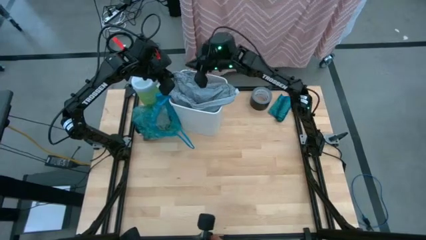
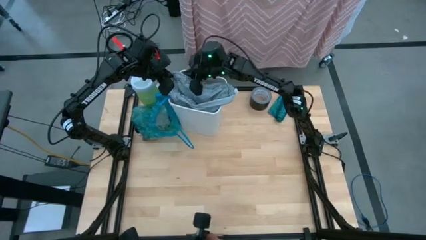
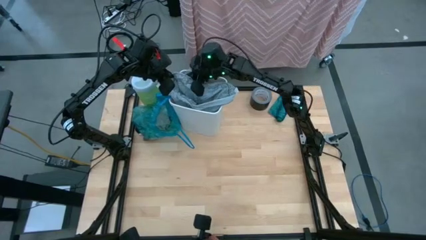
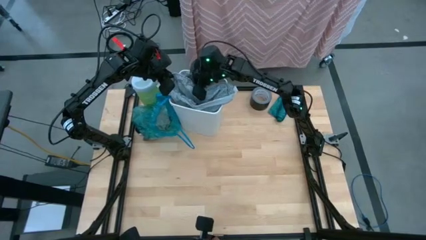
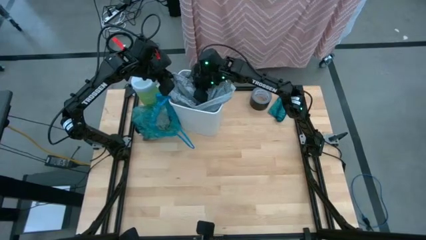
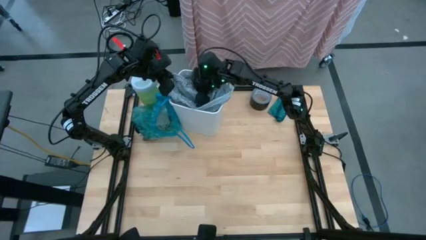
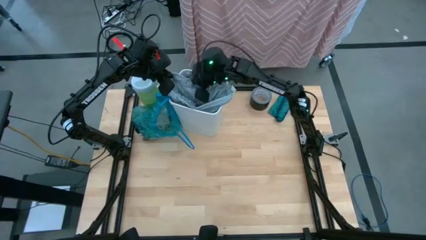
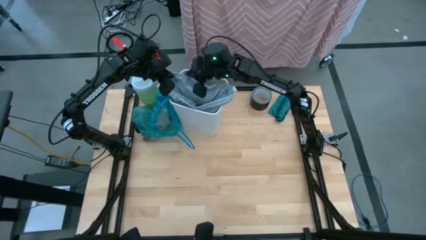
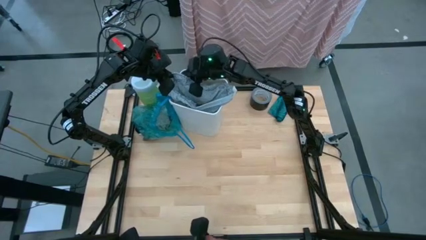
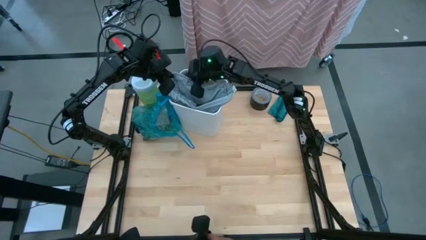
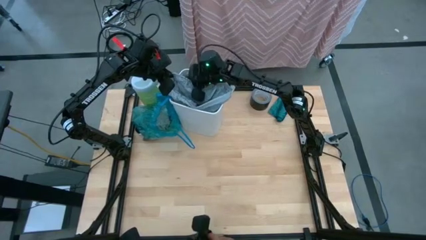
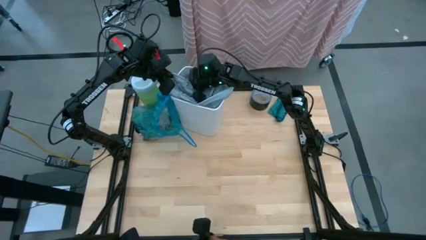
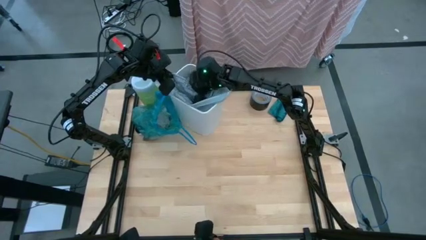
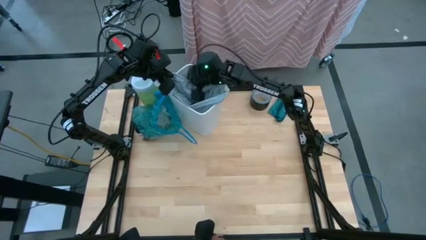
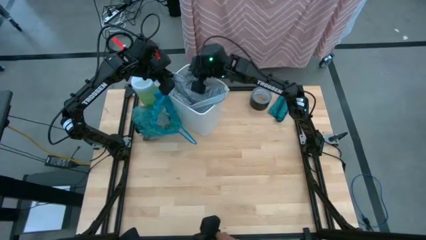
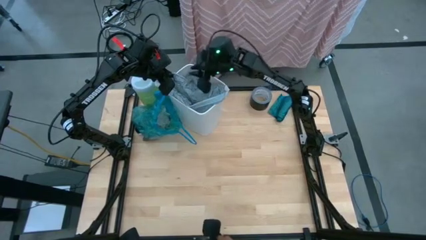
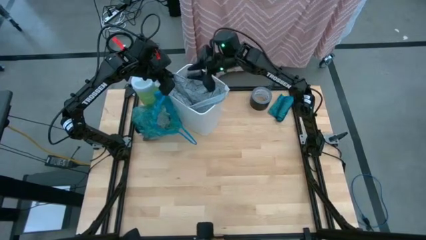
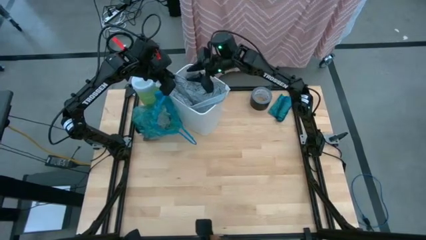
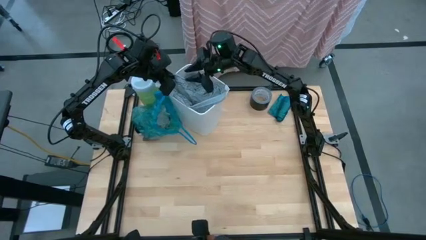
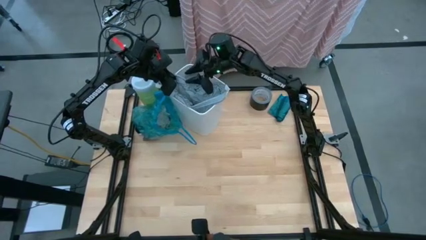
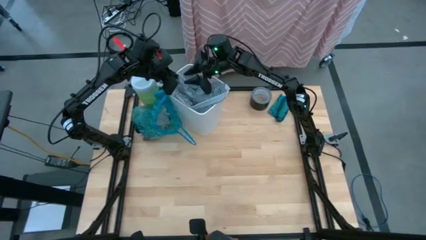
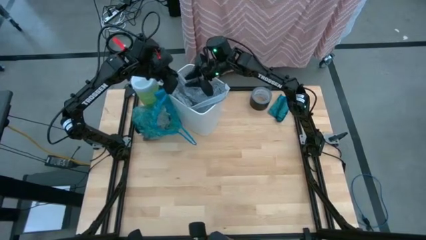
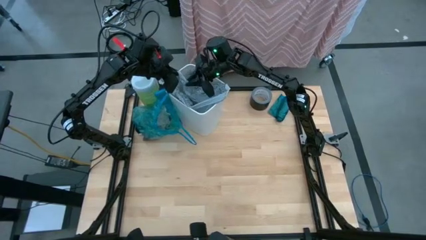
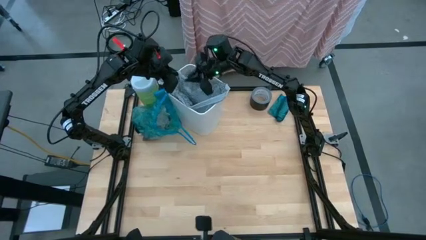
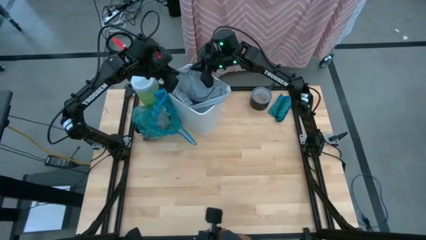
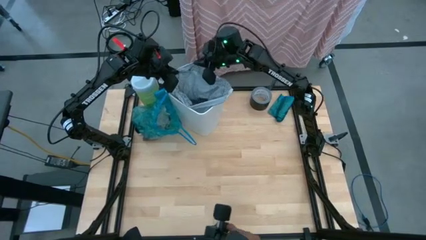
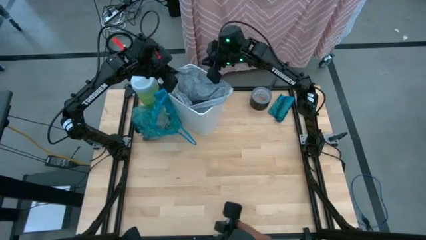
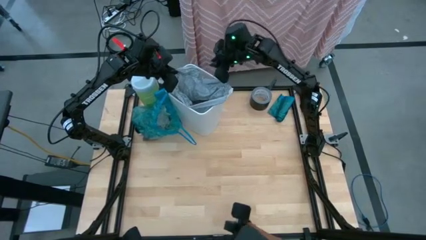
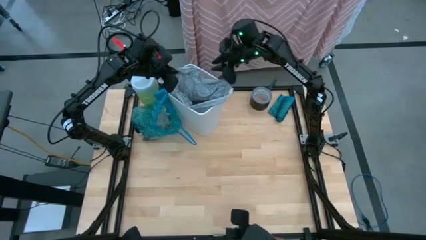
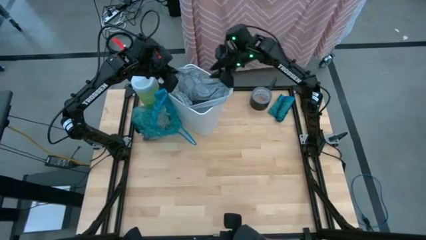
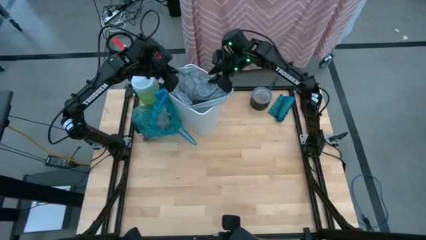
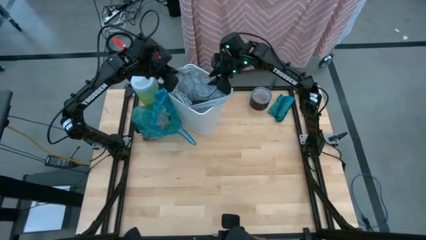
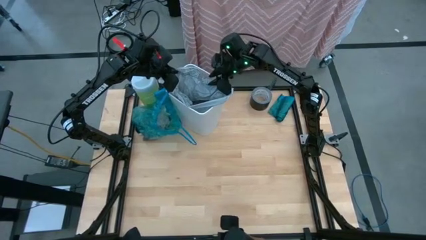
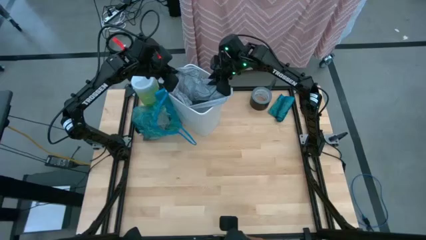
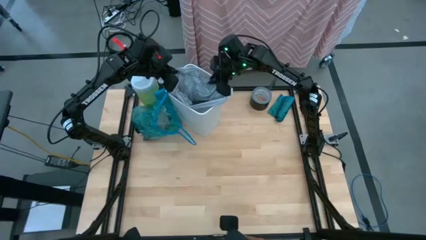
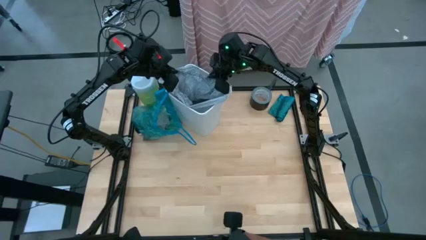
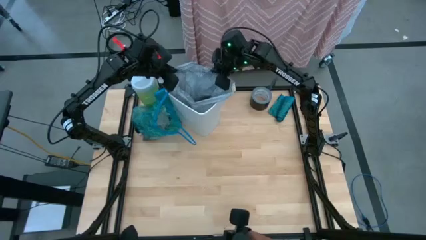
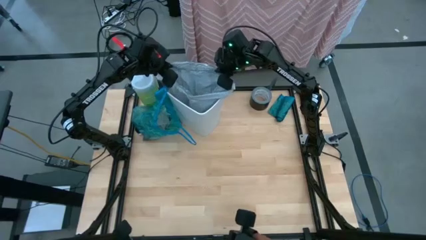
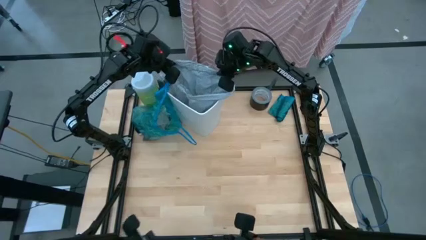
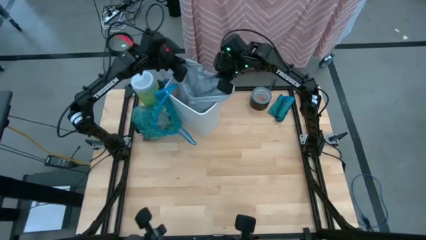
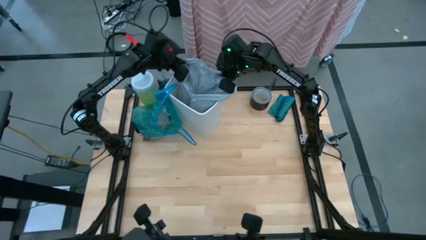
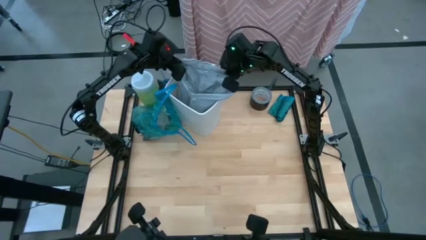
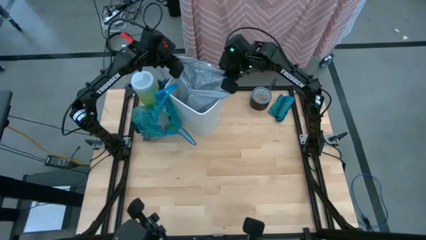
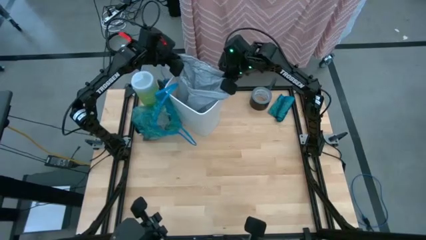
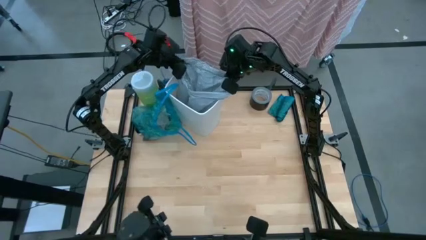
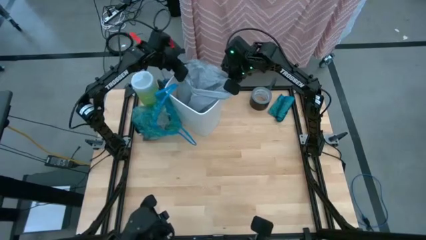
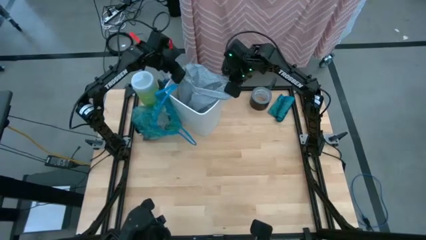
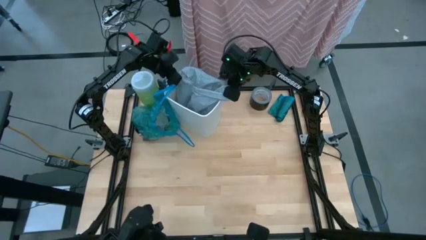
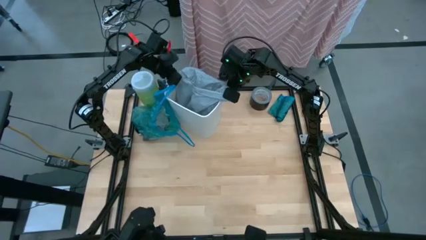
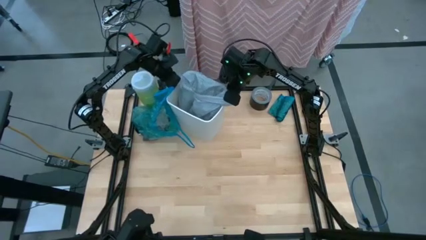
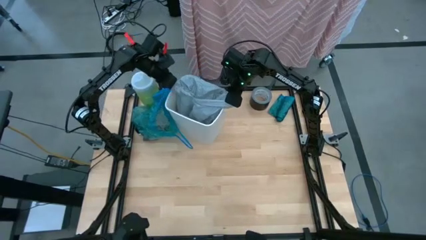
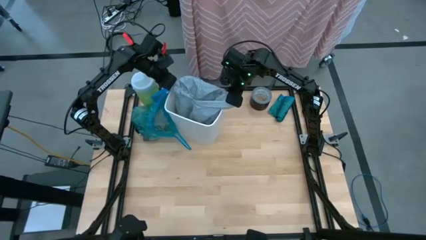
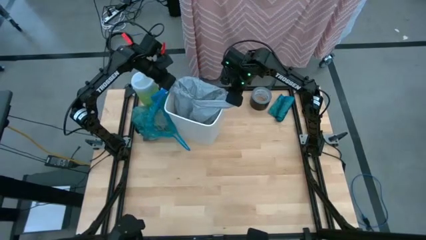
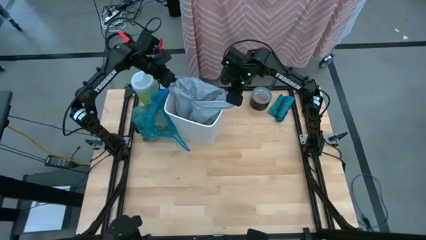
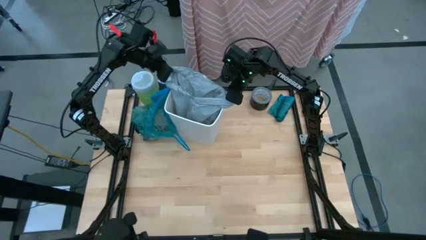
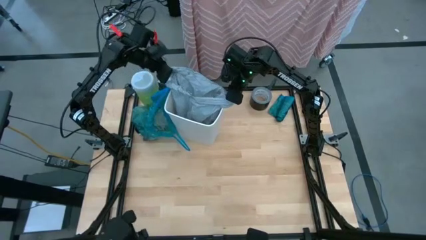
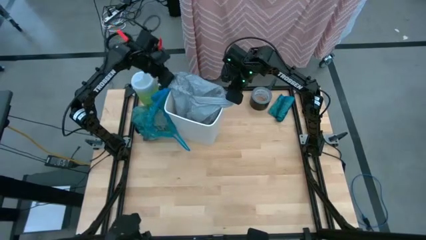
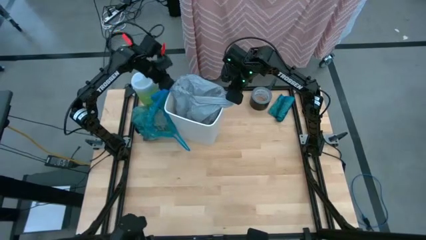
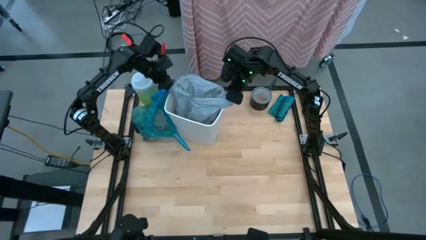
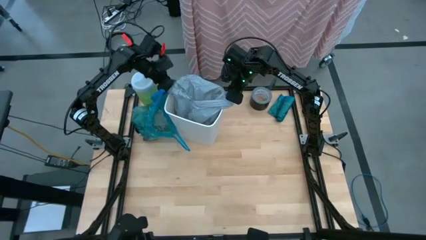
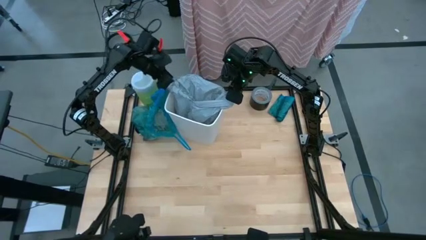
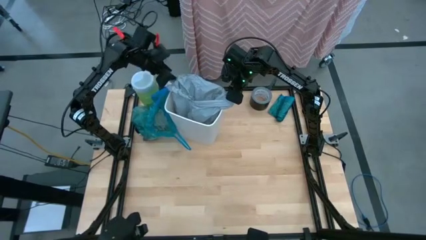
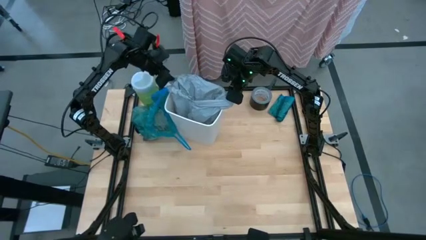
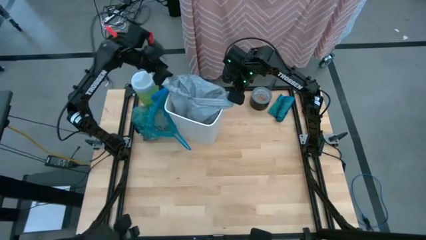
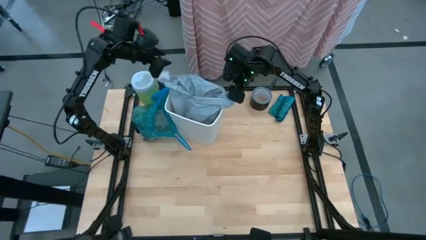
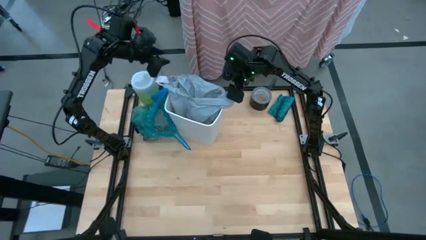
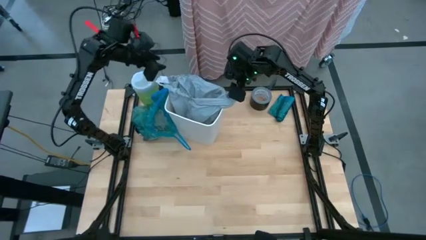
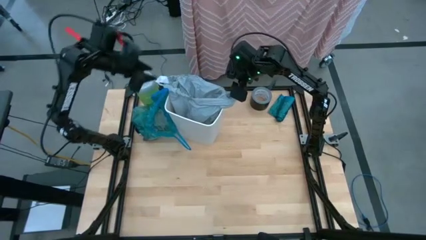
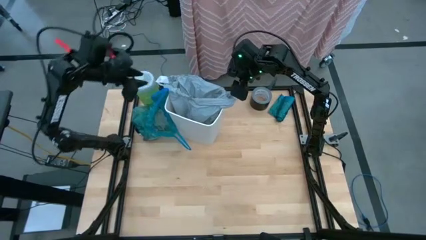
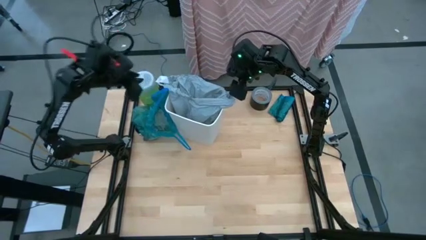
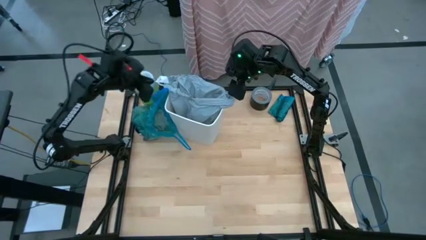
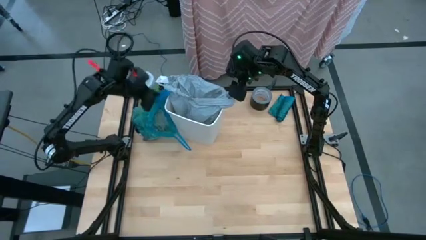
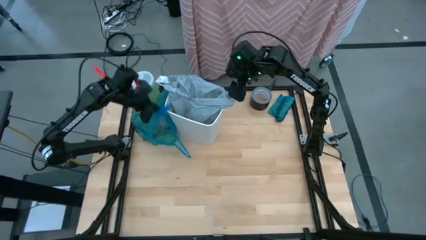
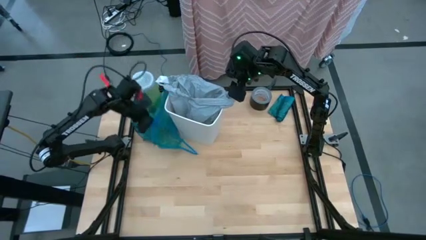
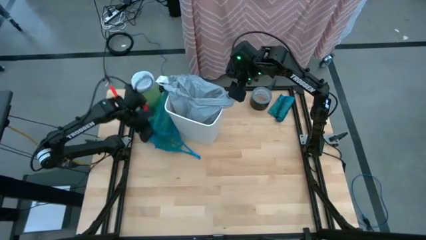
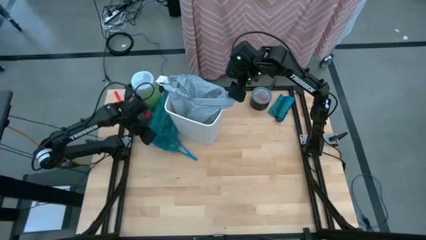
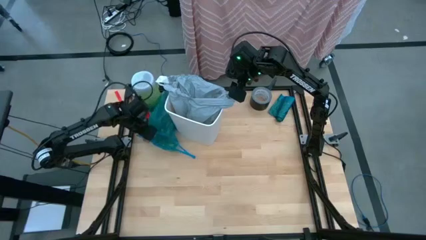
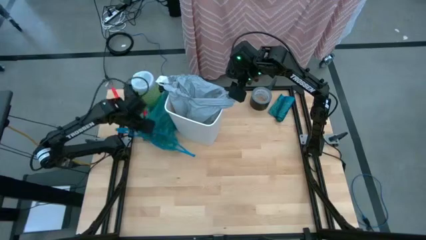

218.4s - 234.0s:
Task: place trash/remove bag and relplace
Insert the gray trash bag into the trash bin

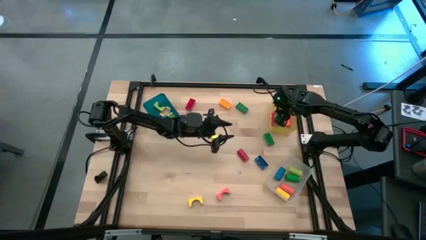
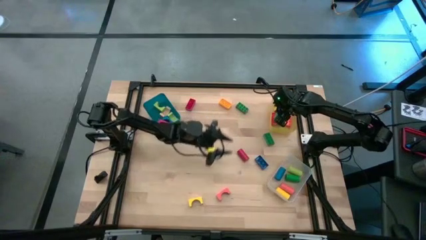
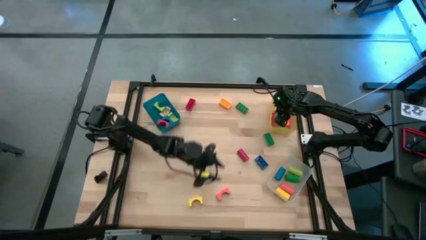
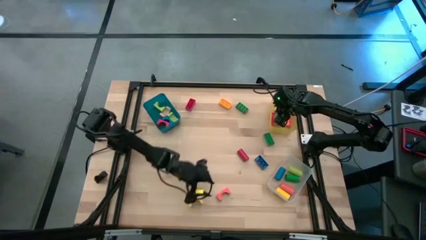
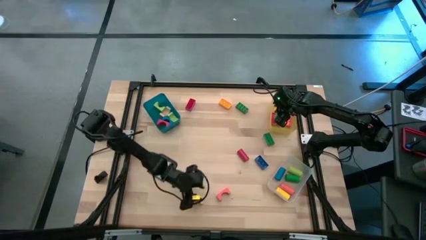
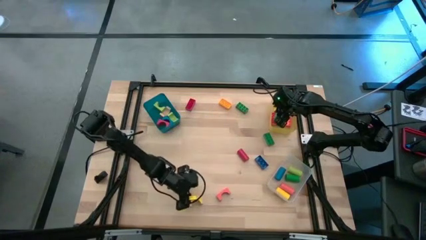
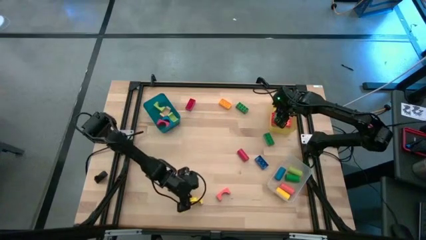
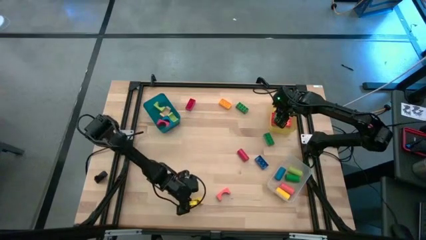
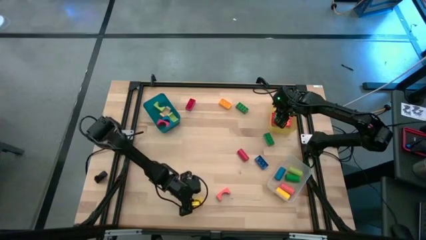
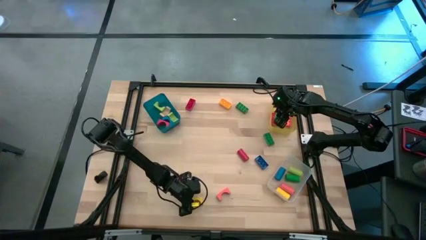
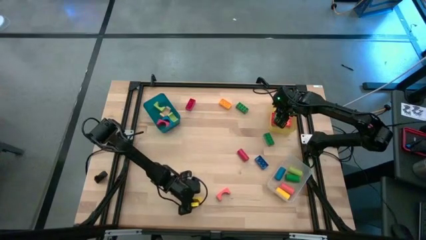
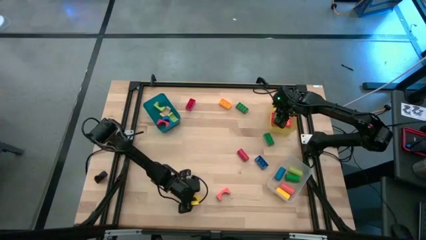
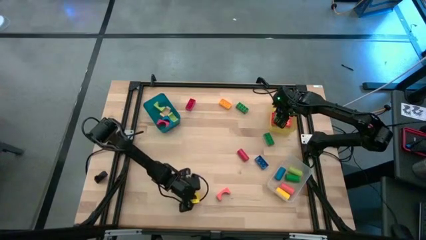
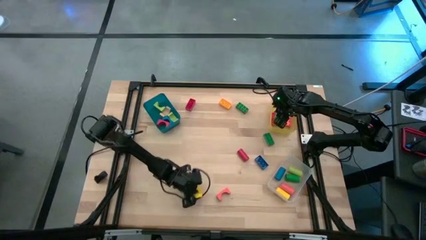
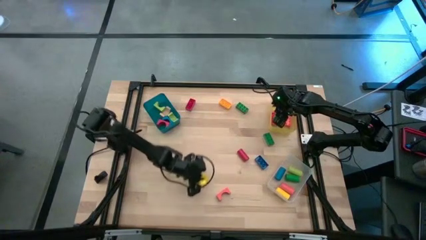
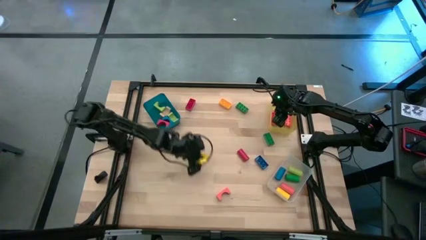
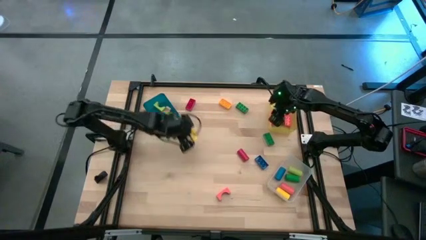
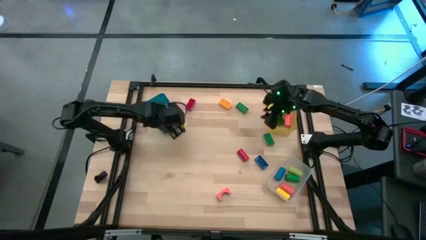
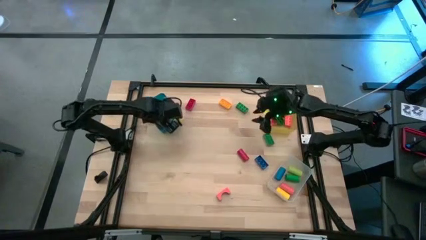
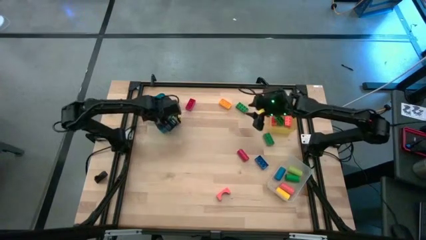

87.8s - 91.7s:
Task: Sort blocks by size
Put the yellow arch block into the blue bin
